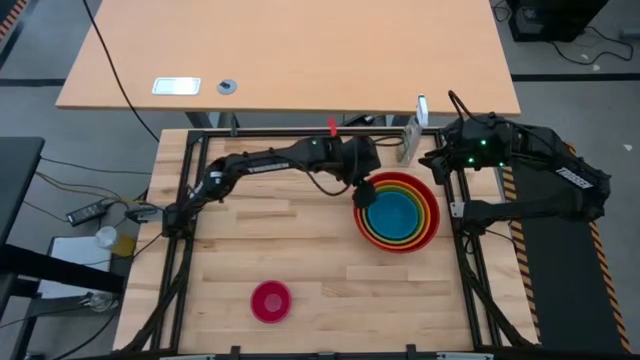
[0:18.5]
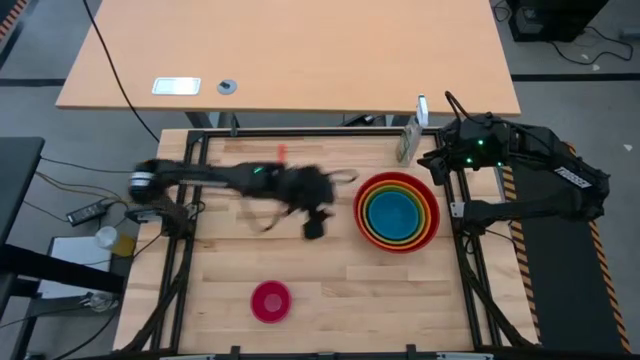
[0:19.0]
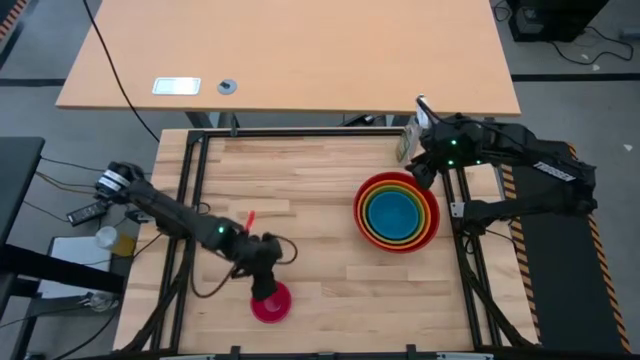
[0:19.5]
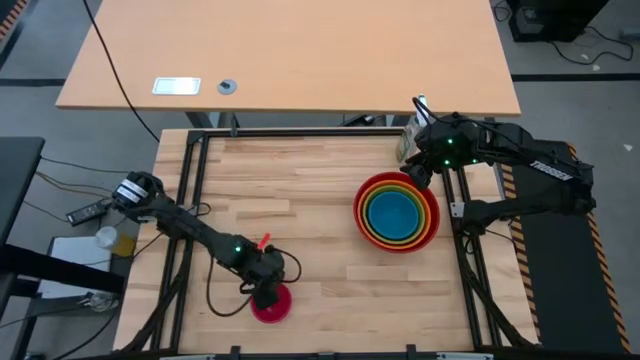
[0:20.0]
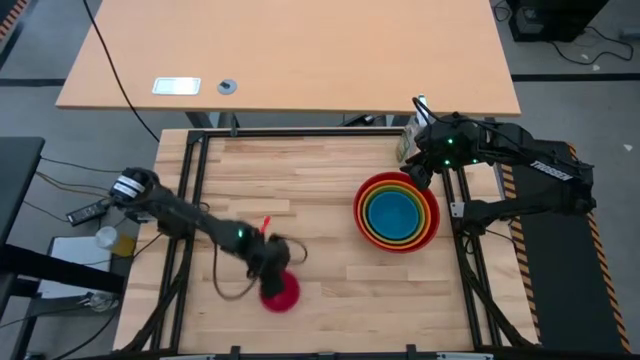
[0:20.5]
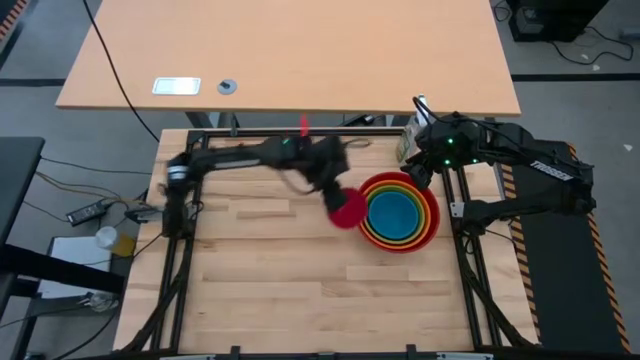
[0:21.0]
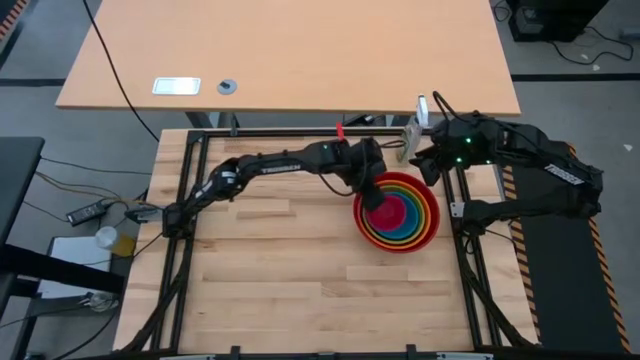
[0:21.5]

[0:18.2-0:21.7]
Stack the red bowl on top of the blue bowl

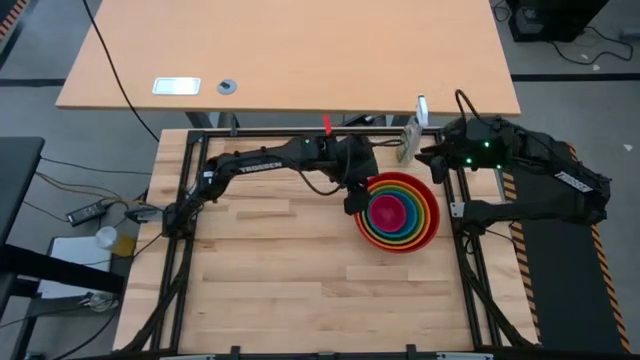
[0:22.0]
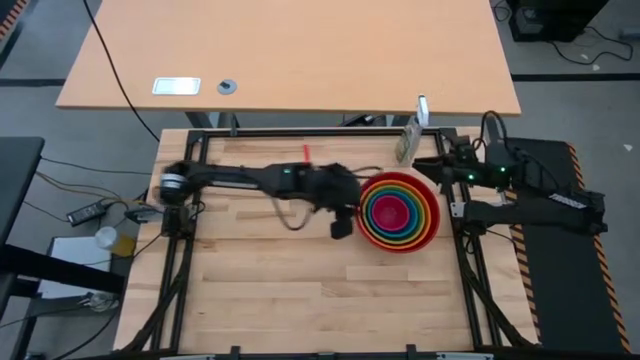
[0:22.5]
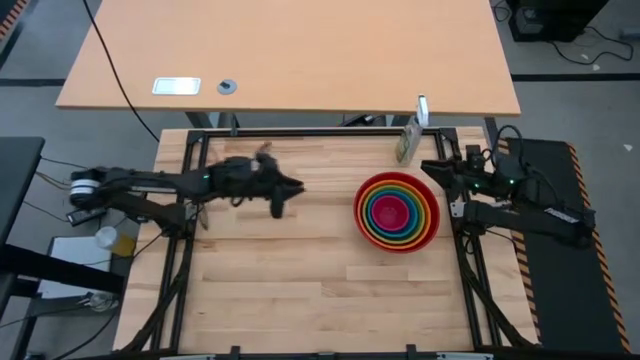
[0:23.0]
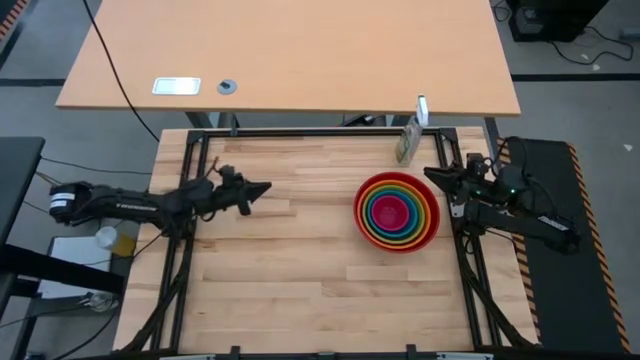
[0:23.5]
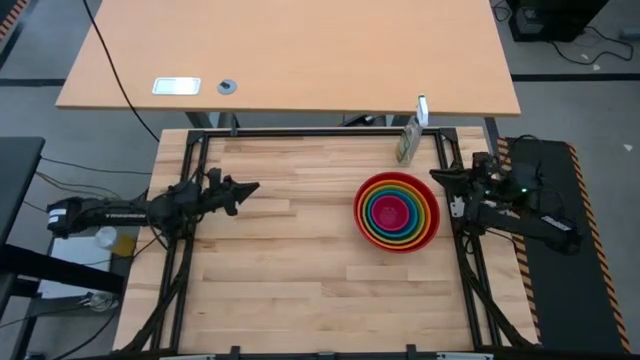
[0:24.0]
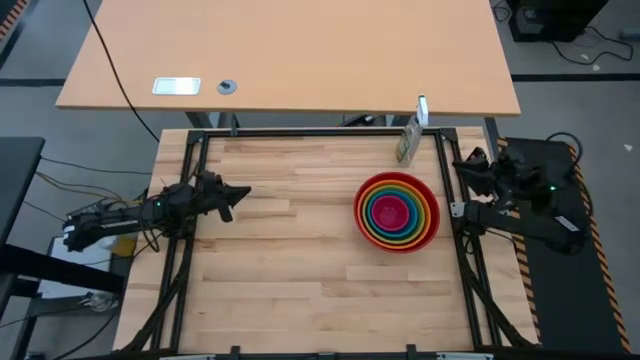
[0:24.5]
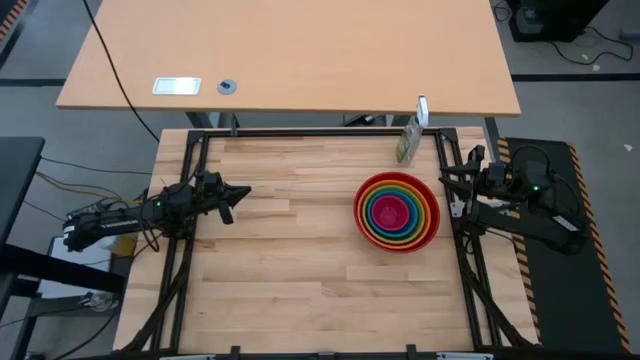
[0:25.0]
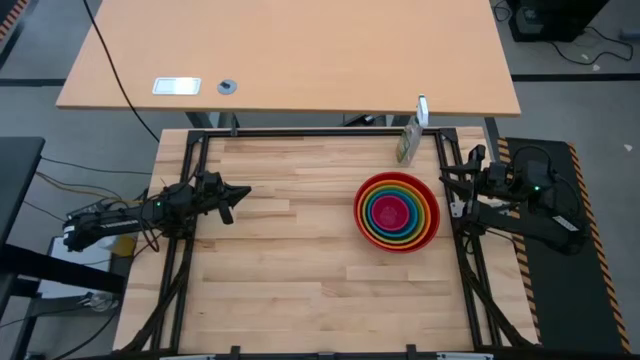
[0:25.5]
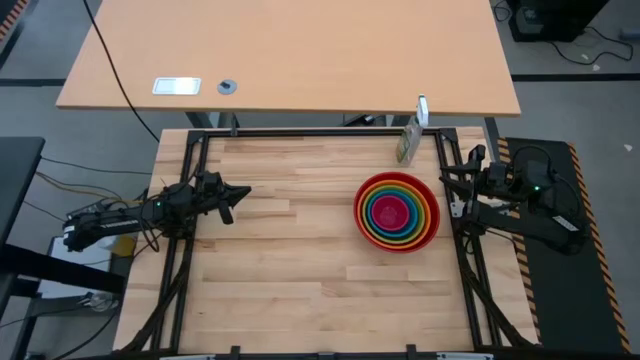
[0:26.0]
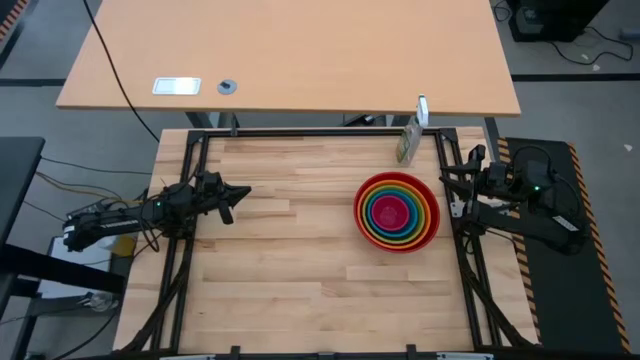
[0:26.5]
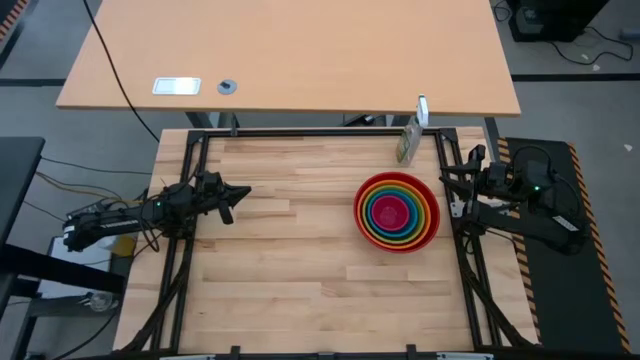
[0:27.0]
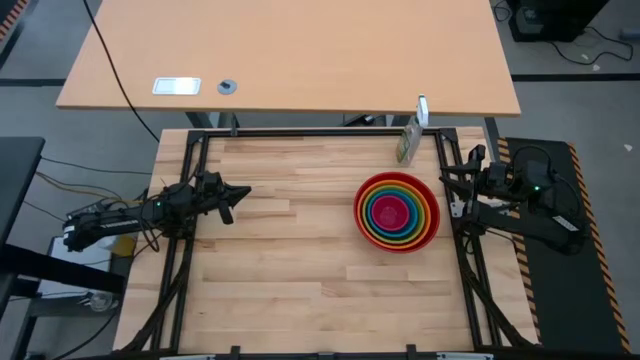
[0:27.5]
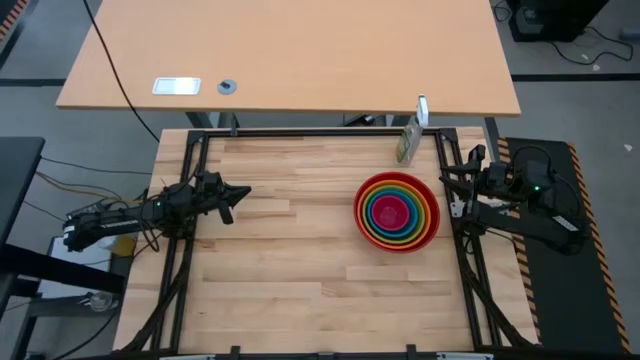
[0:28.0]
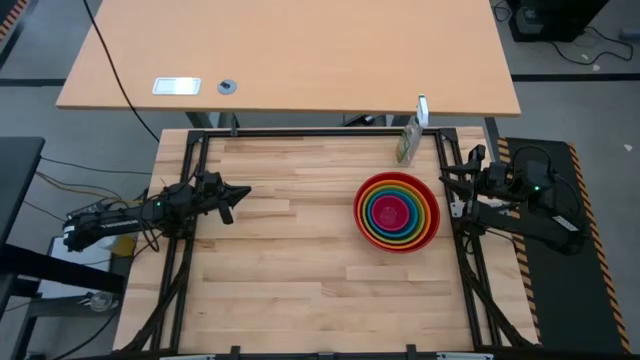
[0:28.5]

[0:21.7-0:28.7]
Return to Home Position
